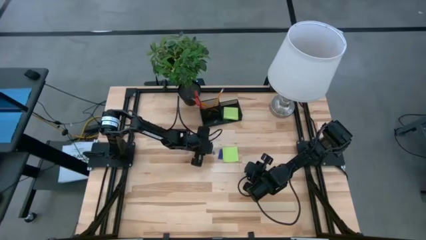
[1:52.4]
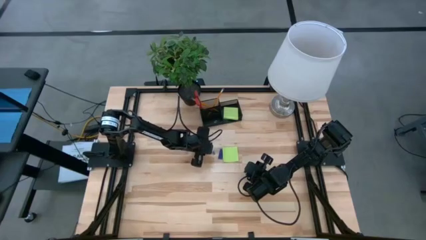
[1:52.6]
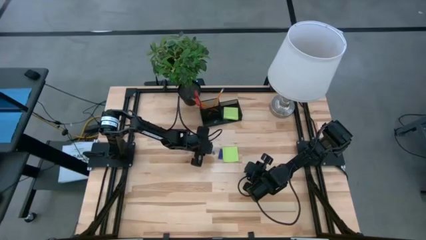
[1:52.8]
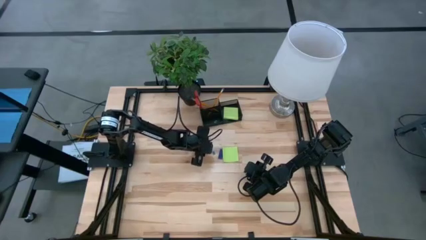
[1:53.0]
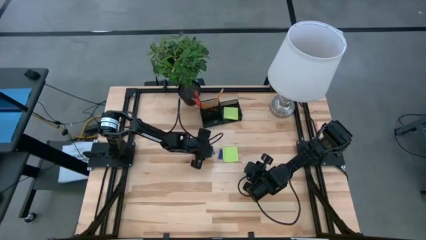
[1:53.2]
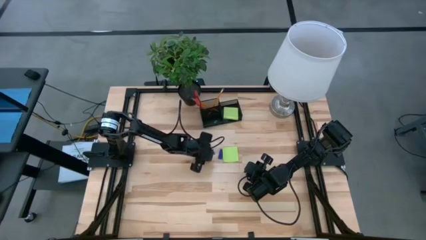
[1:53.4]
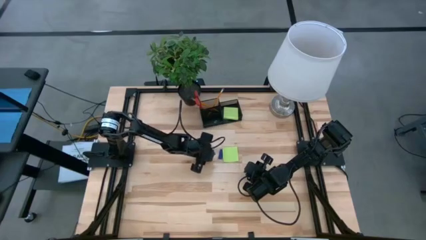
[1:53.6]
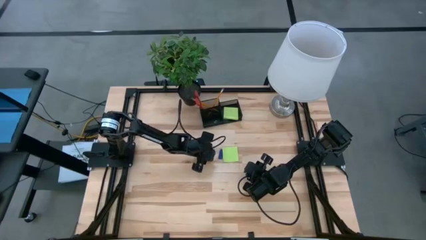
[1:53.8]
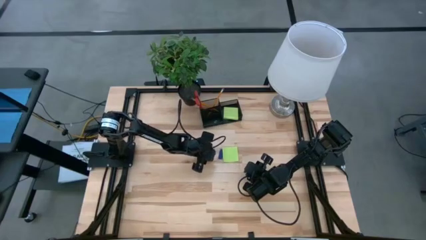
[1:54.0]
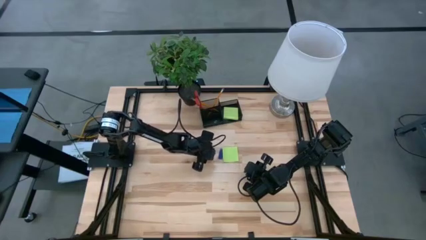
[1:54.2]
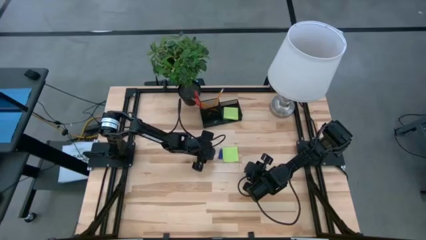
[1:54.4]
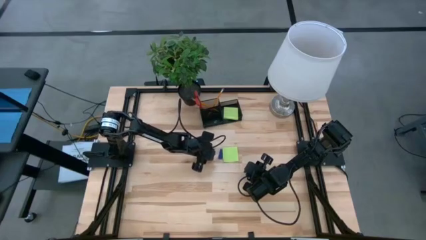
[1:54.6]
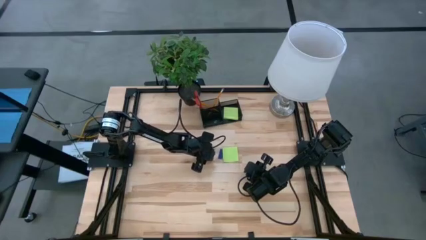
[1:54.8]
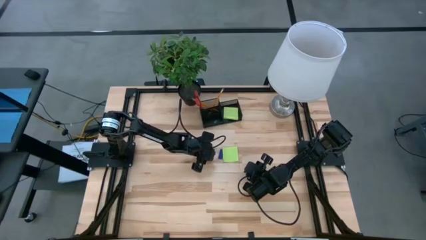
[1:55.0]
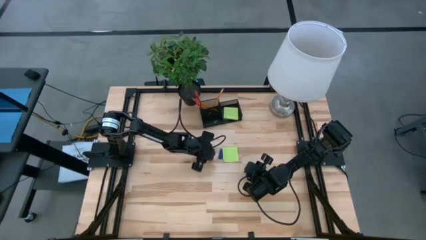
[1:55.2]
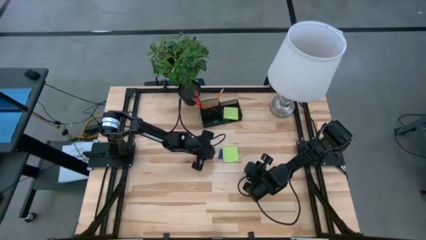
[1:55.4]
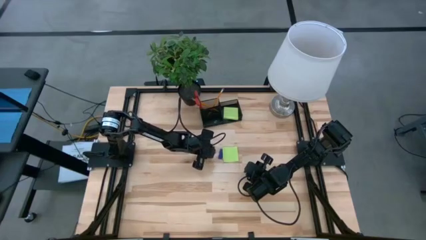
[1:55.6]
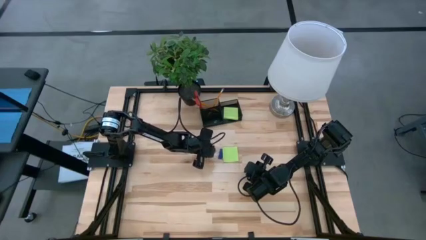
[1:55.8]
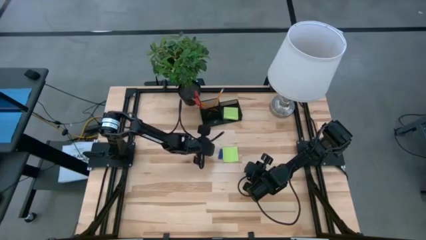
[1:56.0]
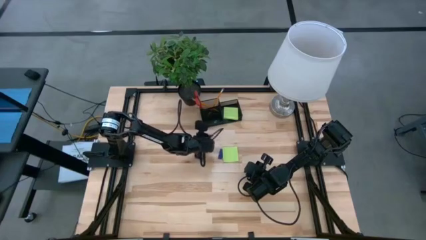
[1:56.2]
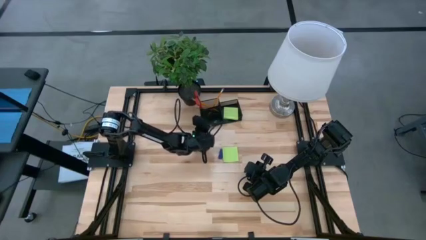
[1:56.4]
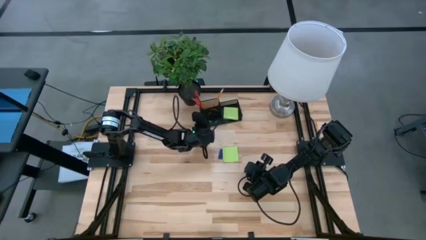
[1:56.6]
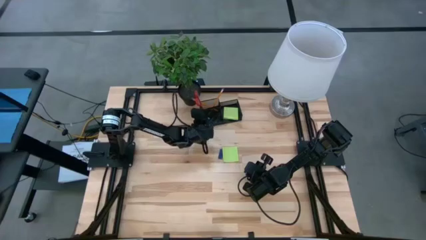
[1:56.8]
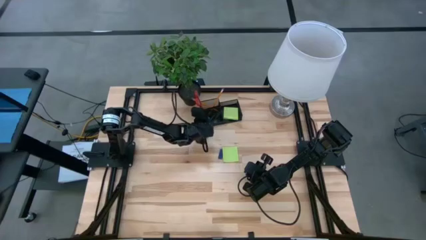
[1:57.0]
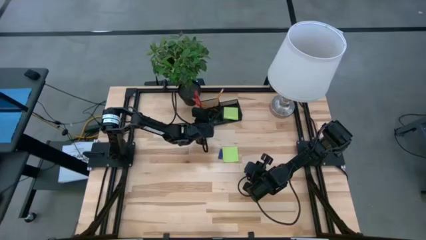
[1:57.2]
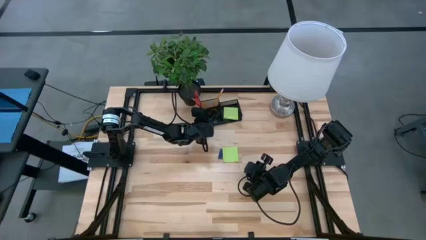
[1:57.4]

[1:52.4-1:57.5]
Task: Pick and place office supplies into organizer
Put the blue binder clip into the desk organizer

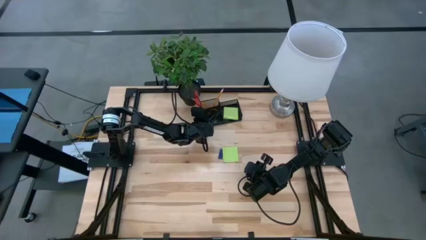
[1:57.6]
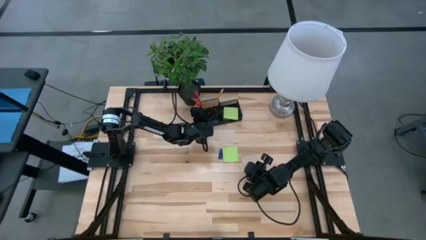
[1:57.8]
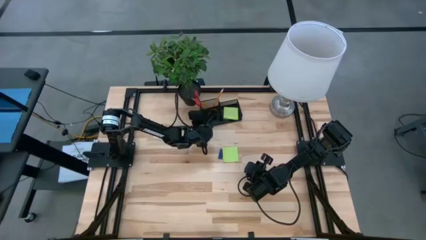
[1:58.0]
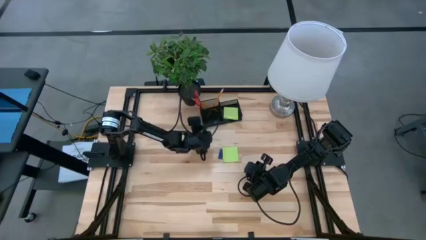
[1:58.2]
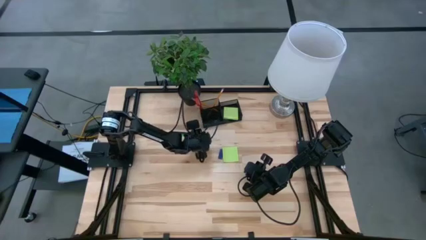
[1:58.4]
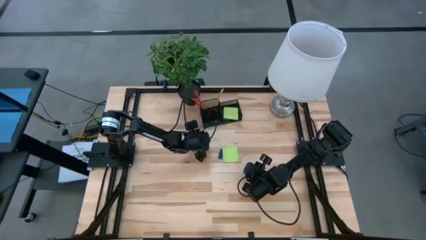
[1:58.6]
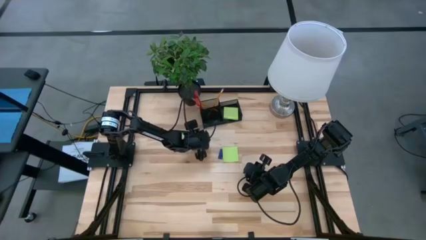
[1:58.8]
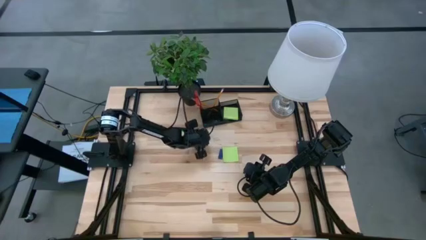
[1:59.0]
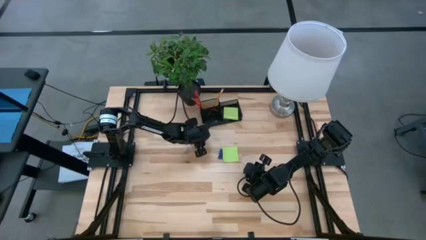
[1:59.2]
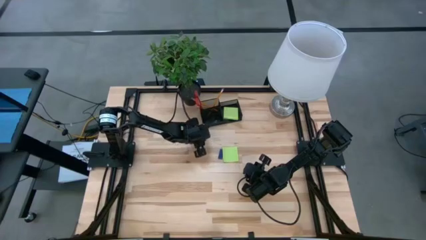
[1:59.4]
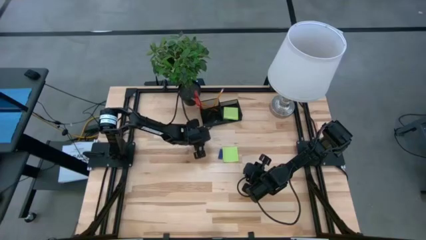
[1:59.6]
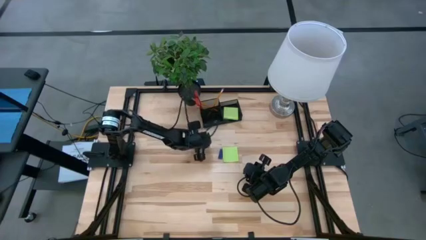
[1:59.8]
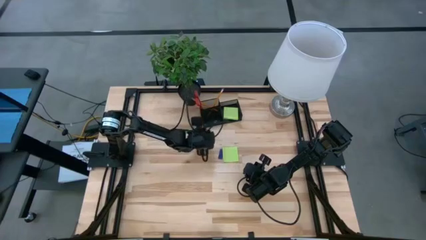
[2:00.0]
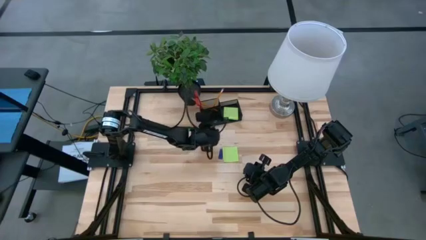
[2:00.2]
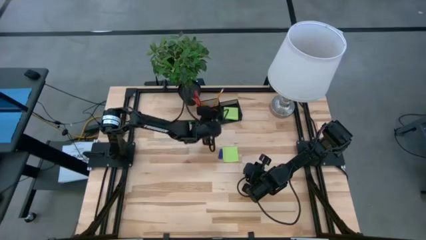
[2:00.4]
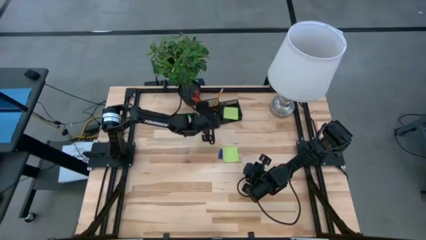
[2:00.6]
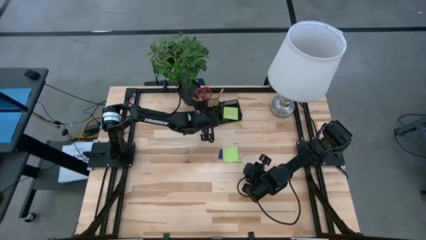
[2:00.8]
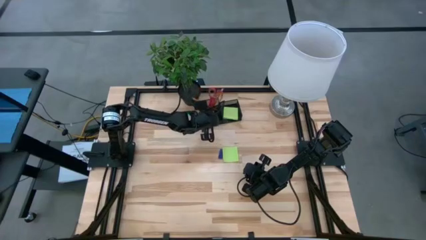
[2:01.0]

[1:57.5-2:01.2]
Put the pink eraser into the desk organizer

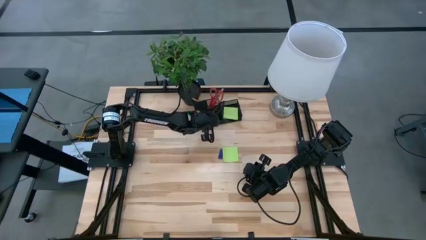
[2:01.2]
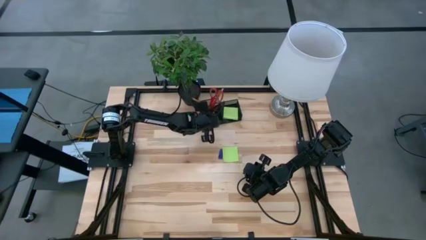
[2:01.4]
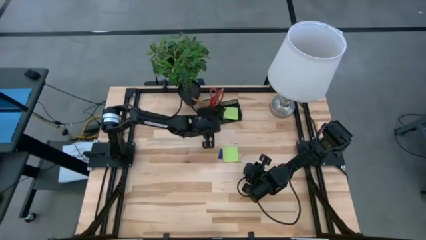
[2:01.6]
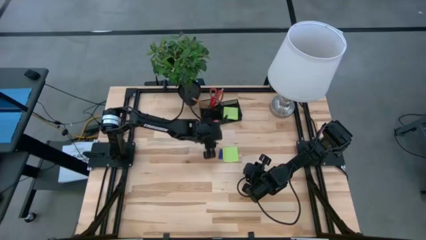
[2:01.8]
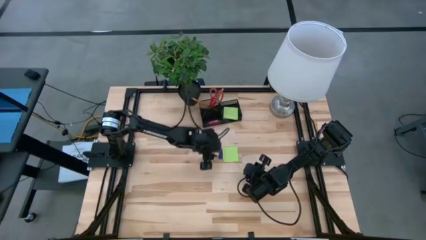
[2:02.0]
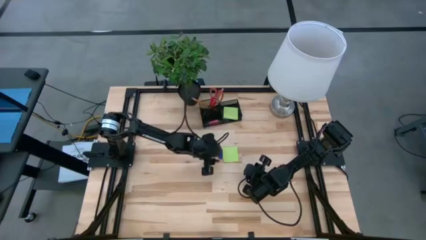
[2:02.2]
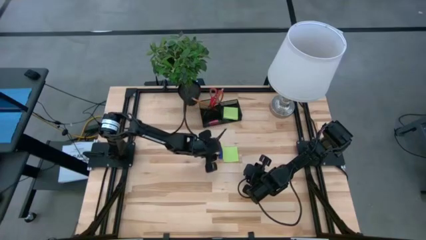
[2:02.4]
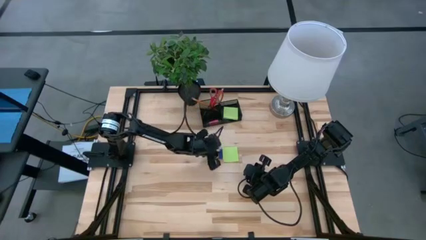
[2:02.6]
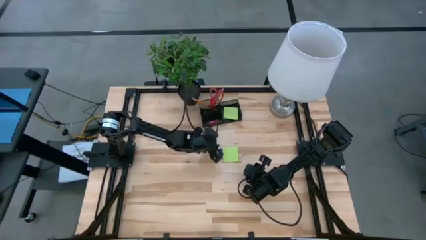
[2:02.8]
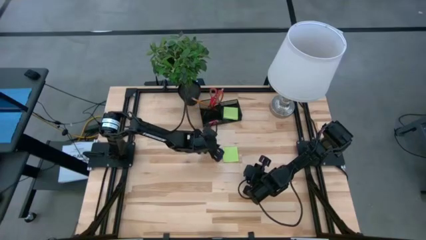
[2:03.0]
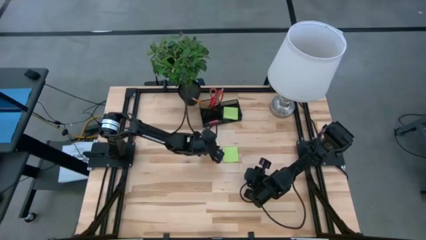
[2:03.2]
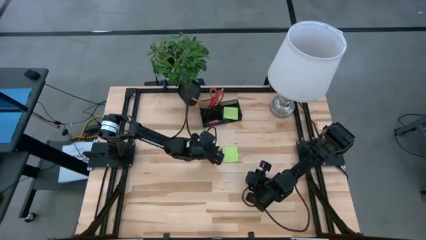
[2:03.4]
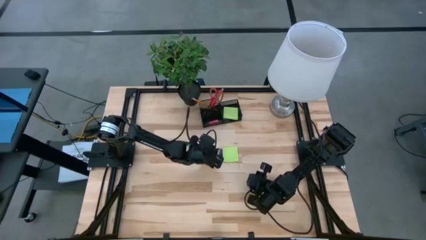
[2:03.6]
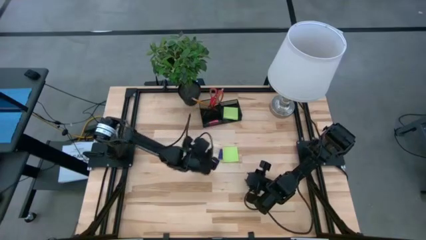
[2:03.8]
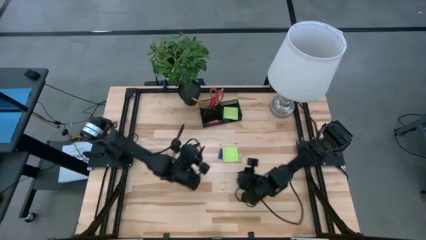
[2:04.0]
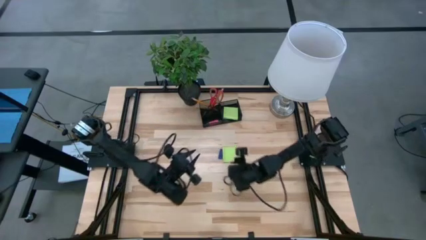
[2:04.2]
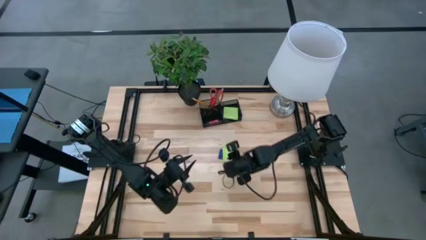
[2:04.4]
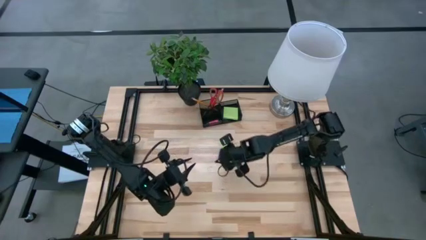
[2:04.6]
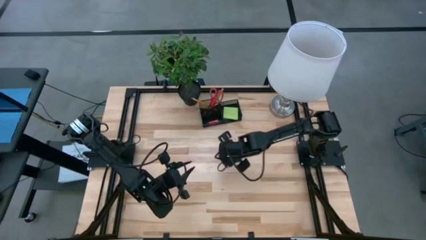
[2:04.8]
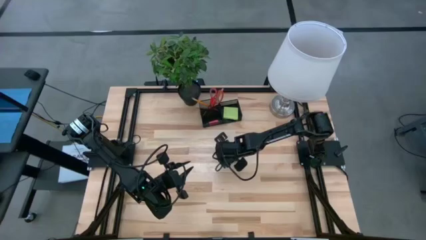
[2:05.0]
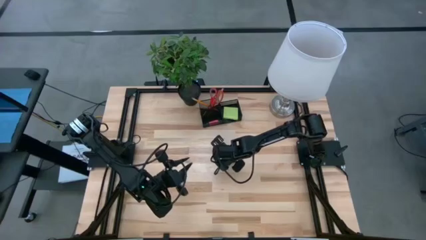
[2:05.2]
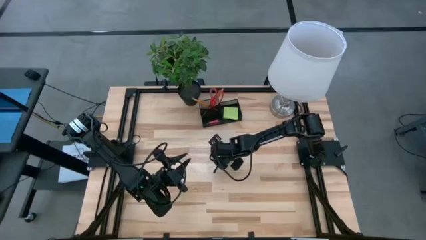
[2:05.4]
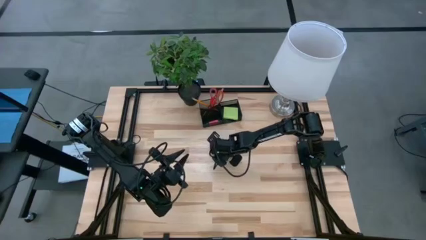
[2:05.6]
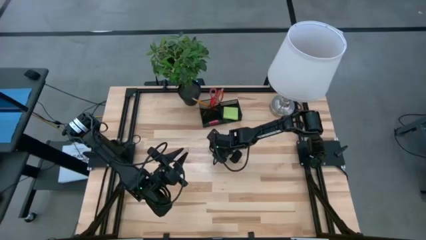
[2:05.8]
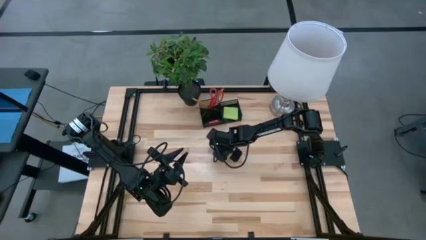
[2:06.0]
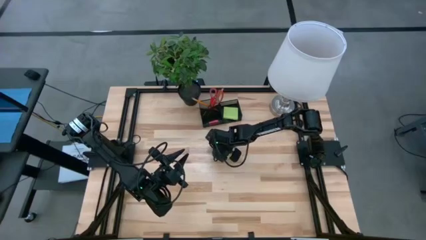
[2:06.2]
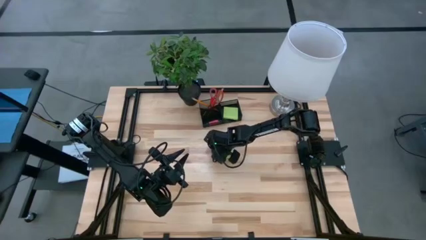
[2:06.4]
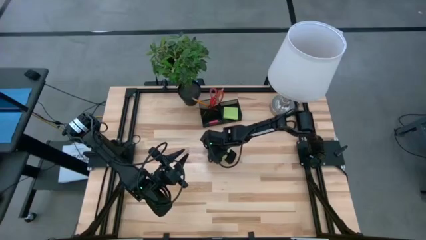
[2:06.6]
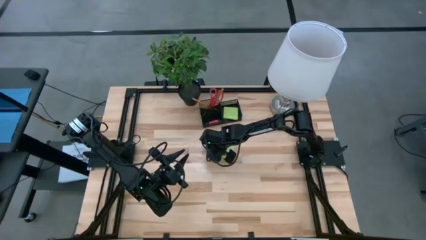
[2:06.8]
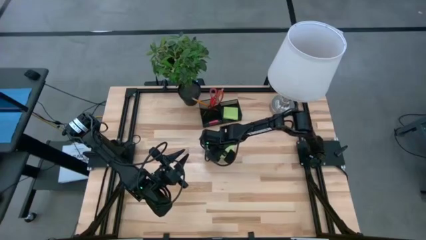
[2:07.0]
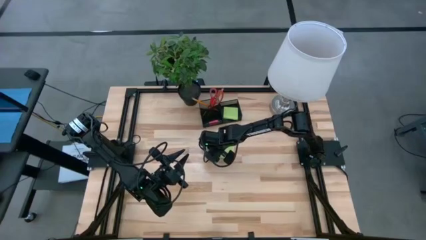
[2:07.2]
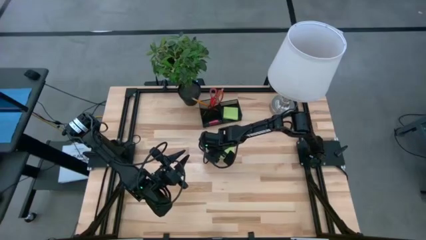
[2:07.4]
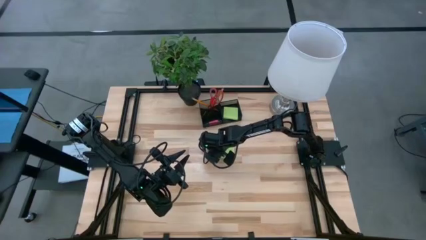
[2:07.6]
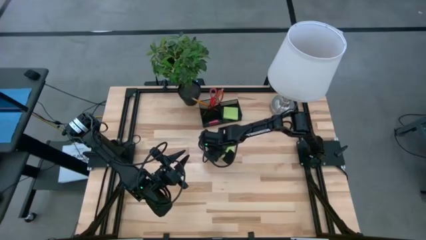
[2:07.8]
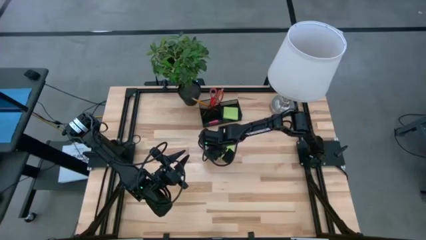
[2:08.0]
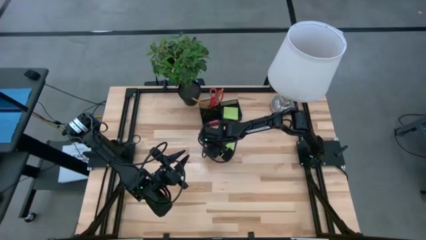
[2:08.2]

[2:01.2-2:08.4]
Put the blue eraser into the desk organizer
